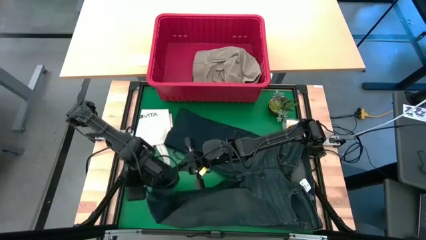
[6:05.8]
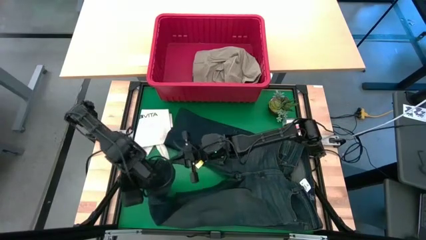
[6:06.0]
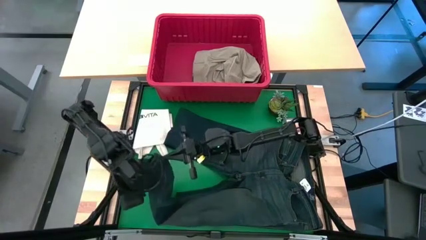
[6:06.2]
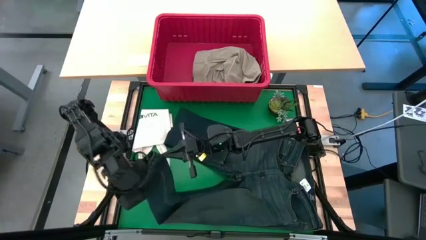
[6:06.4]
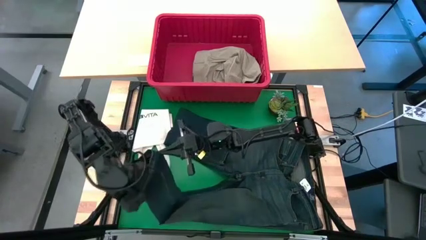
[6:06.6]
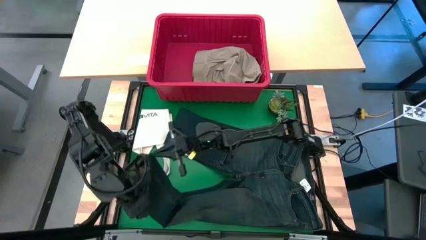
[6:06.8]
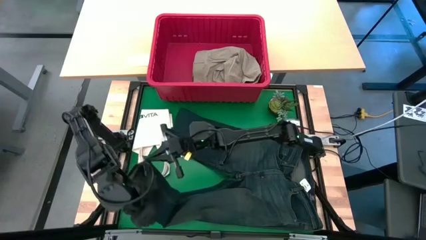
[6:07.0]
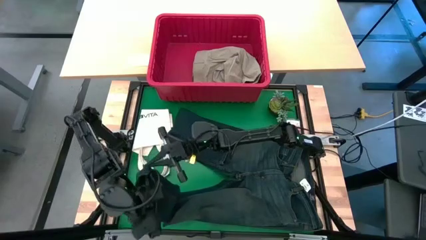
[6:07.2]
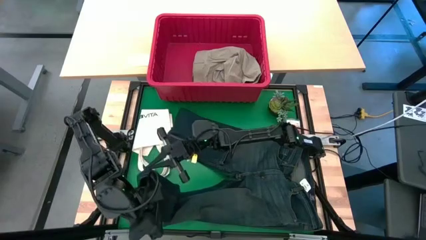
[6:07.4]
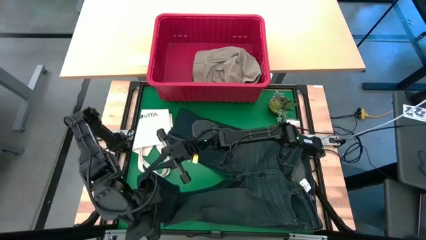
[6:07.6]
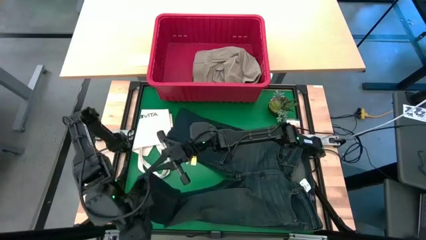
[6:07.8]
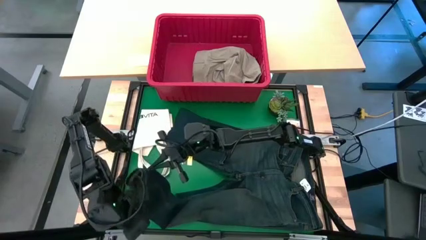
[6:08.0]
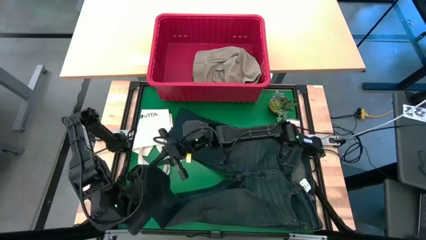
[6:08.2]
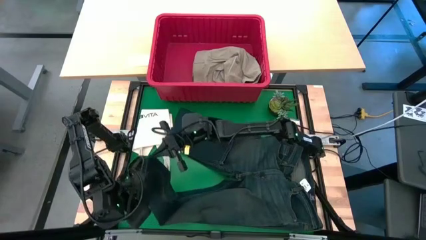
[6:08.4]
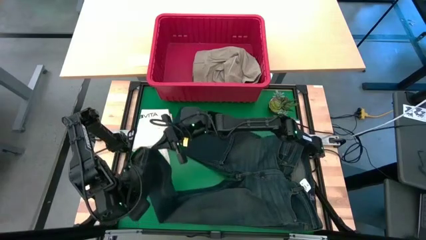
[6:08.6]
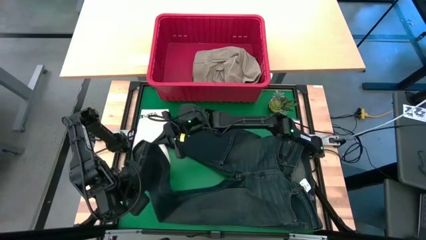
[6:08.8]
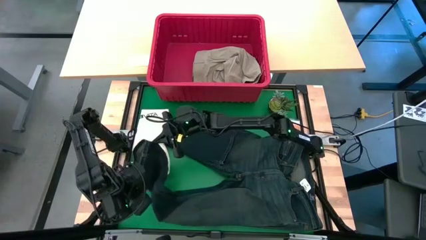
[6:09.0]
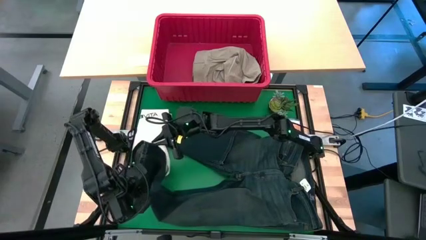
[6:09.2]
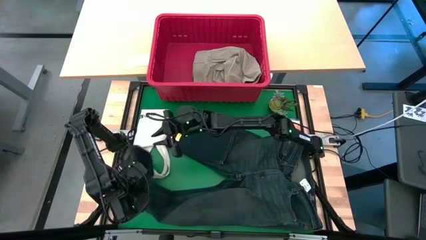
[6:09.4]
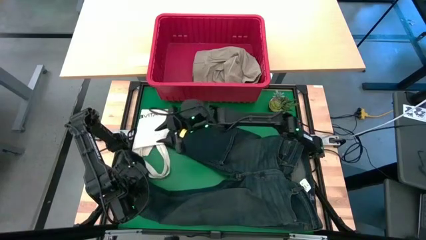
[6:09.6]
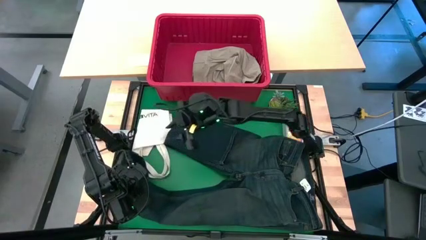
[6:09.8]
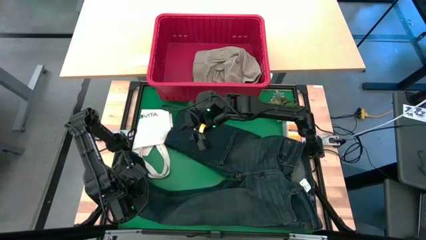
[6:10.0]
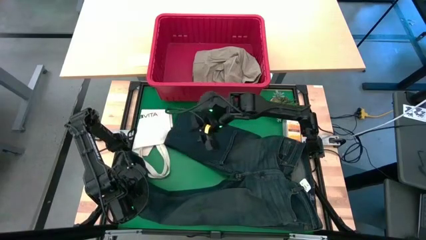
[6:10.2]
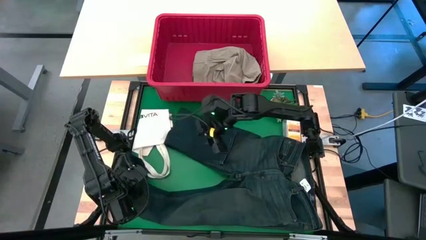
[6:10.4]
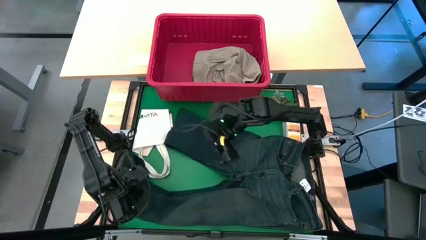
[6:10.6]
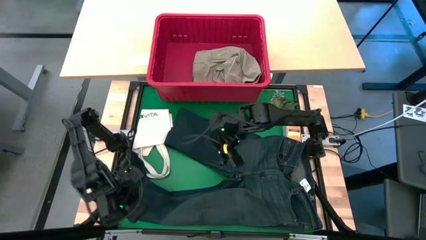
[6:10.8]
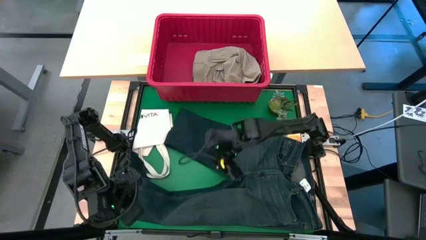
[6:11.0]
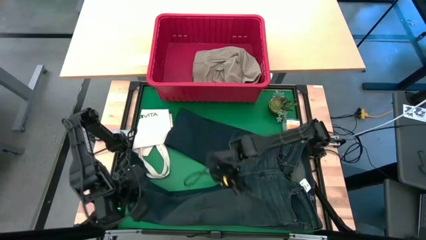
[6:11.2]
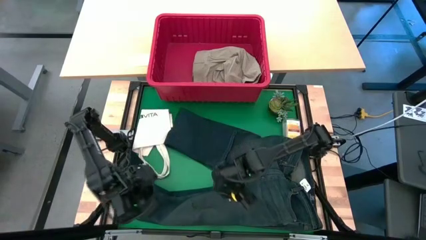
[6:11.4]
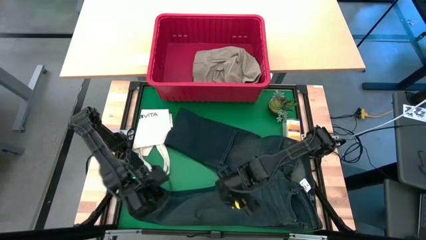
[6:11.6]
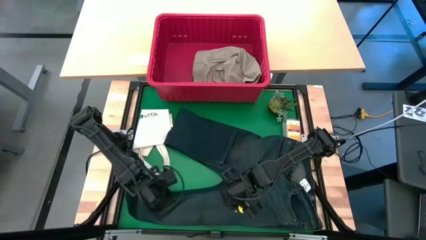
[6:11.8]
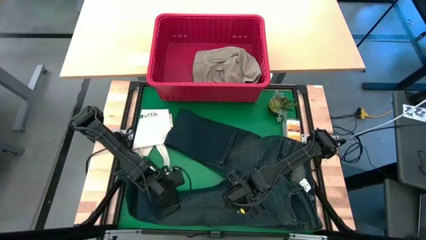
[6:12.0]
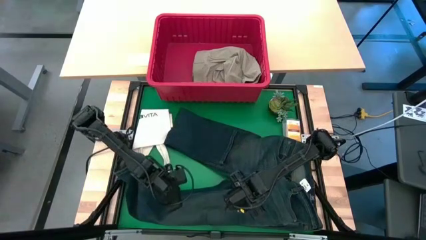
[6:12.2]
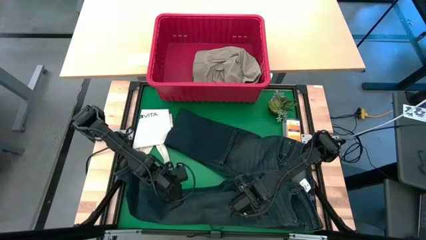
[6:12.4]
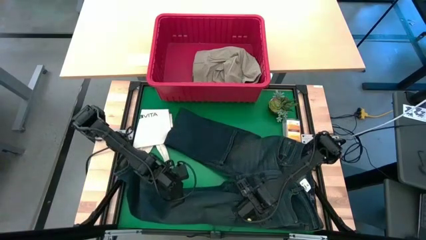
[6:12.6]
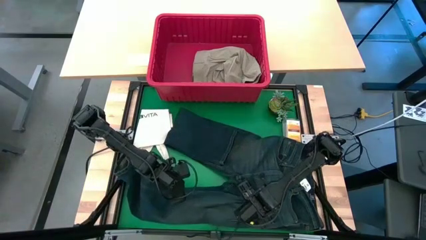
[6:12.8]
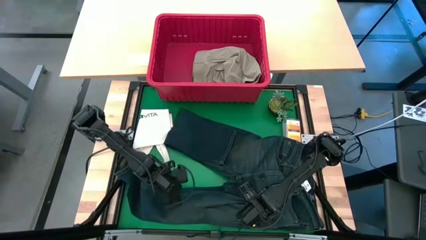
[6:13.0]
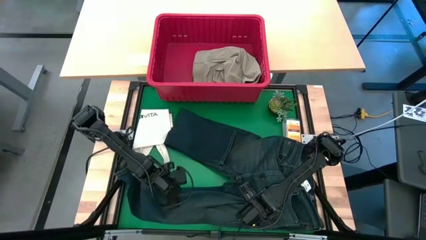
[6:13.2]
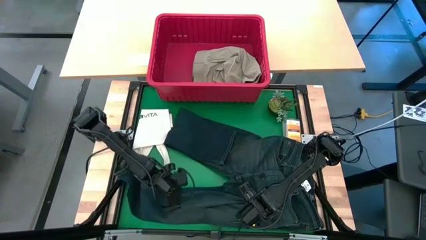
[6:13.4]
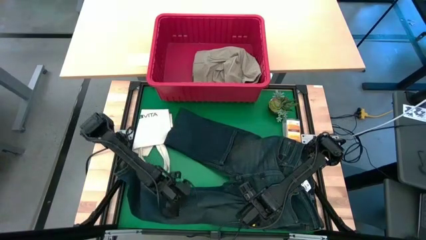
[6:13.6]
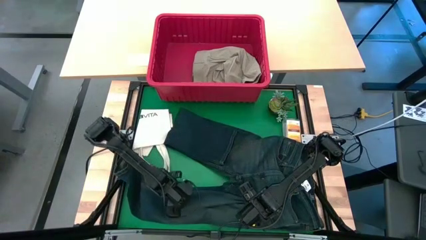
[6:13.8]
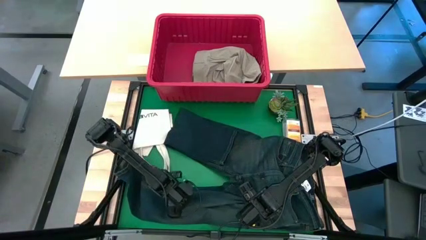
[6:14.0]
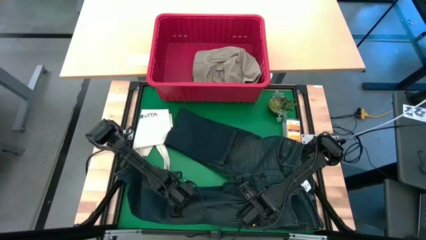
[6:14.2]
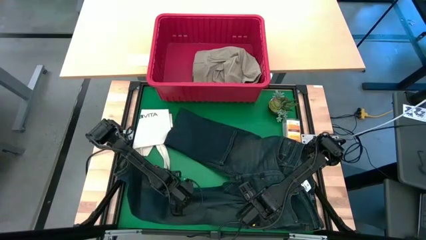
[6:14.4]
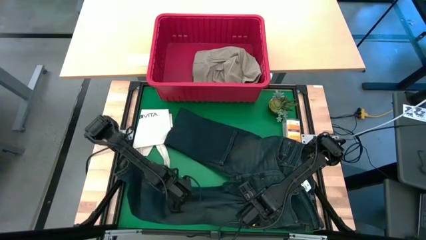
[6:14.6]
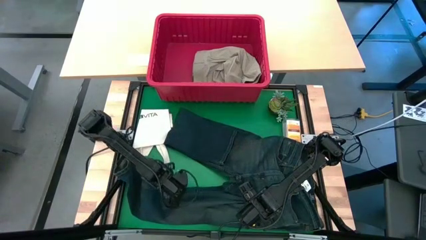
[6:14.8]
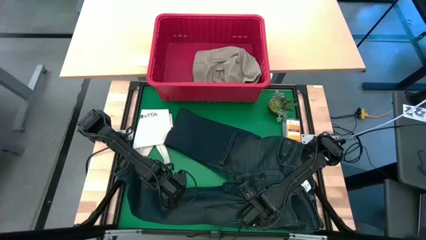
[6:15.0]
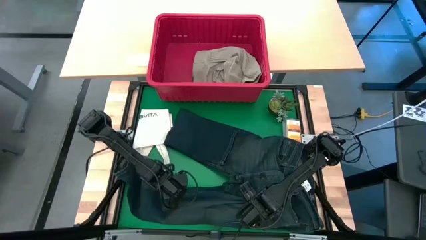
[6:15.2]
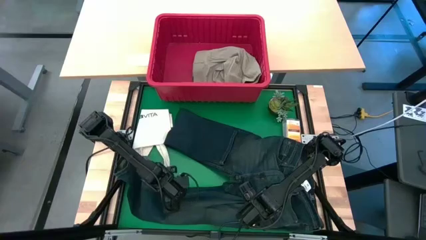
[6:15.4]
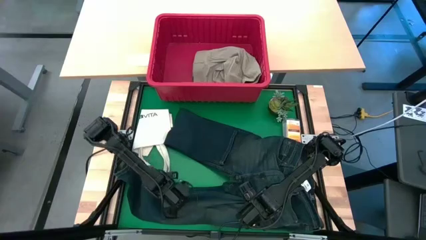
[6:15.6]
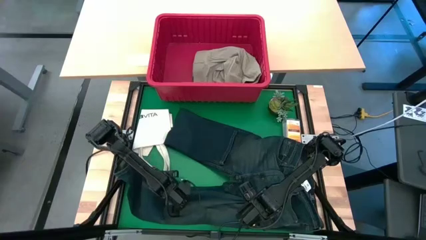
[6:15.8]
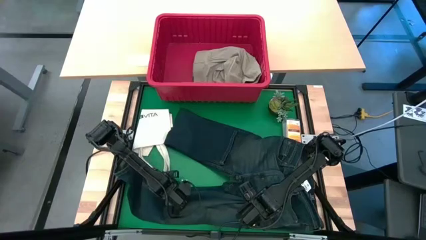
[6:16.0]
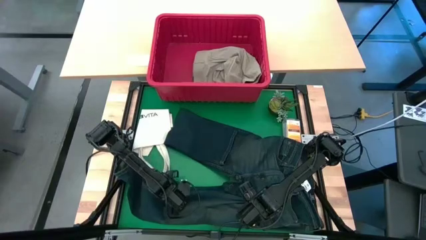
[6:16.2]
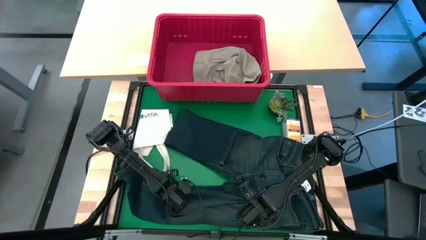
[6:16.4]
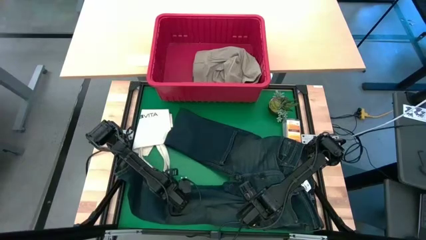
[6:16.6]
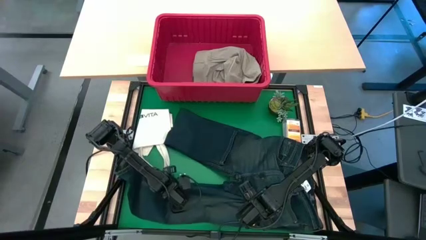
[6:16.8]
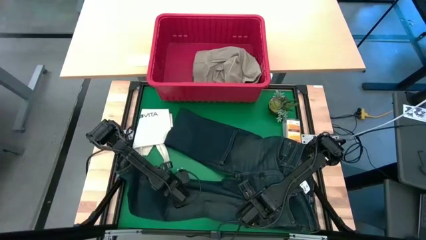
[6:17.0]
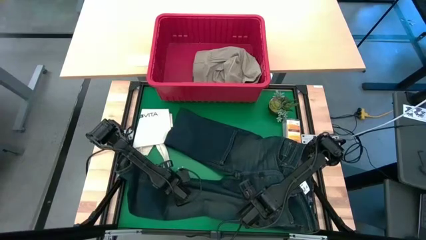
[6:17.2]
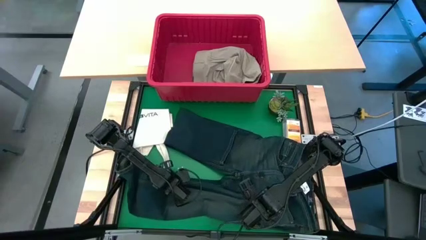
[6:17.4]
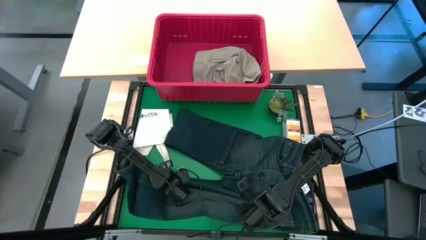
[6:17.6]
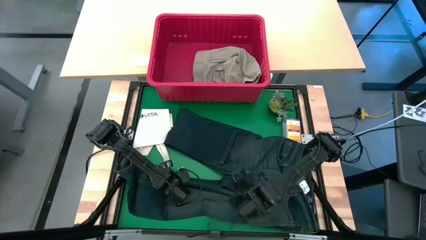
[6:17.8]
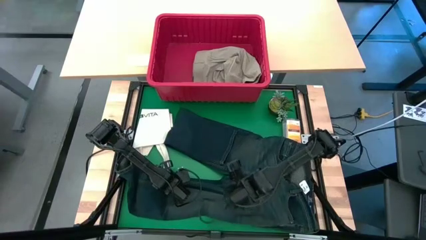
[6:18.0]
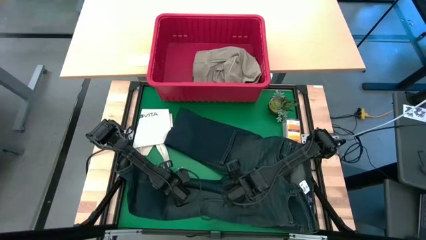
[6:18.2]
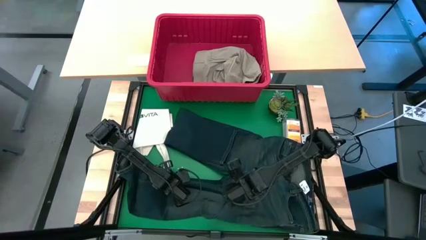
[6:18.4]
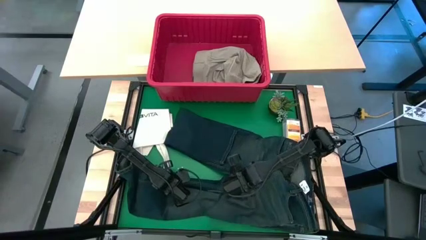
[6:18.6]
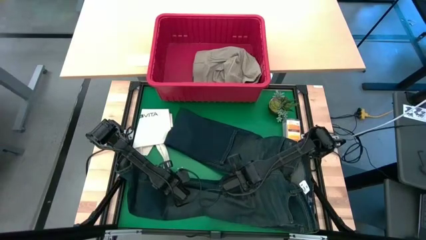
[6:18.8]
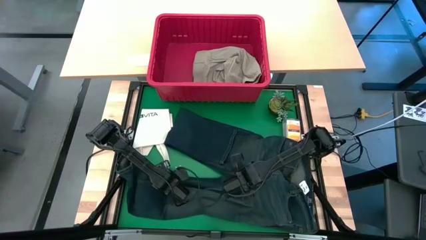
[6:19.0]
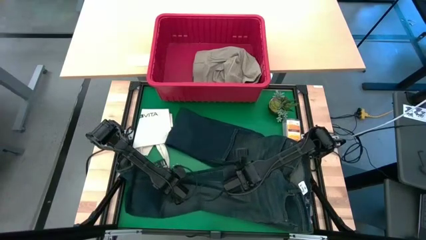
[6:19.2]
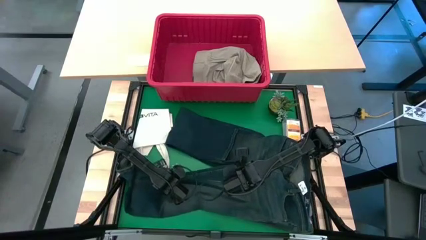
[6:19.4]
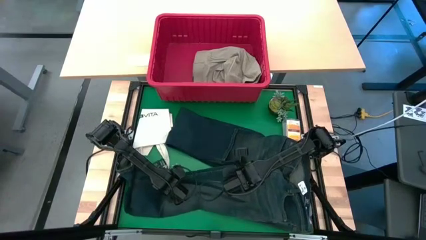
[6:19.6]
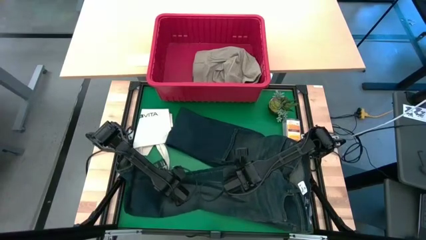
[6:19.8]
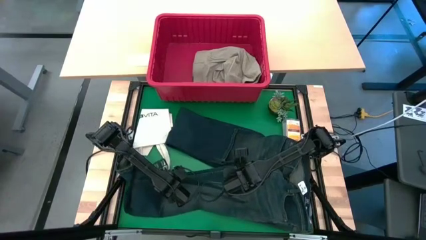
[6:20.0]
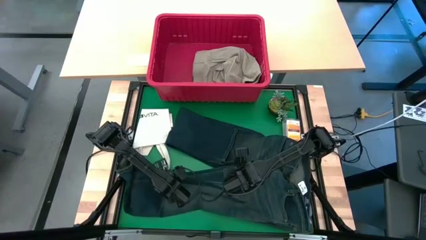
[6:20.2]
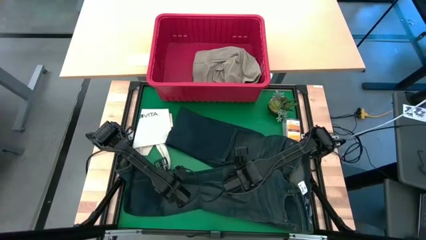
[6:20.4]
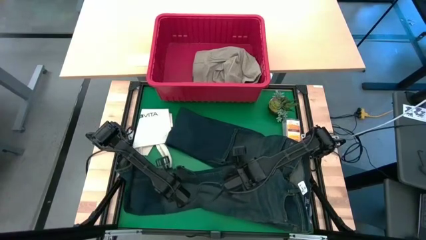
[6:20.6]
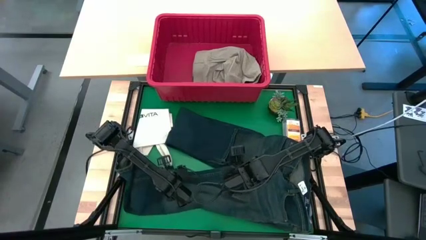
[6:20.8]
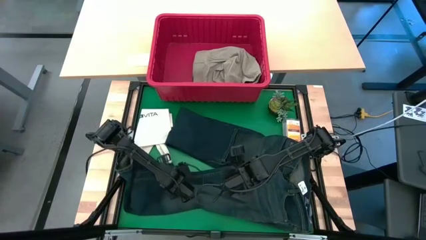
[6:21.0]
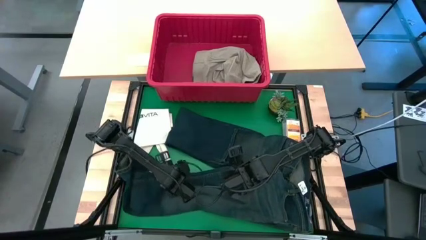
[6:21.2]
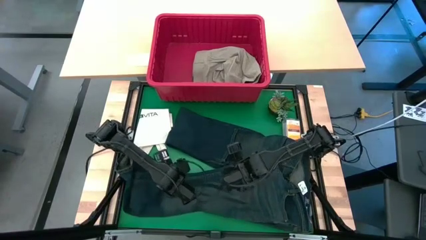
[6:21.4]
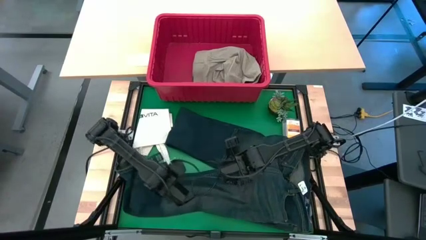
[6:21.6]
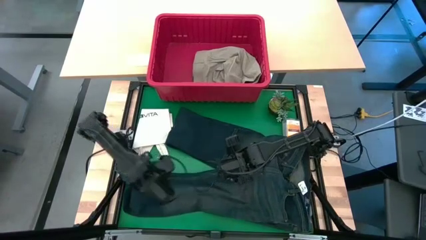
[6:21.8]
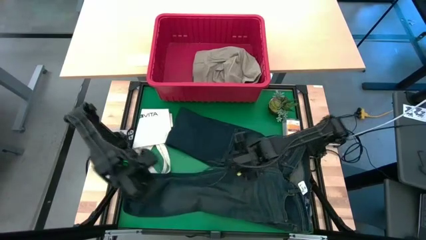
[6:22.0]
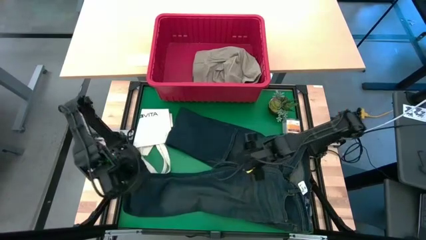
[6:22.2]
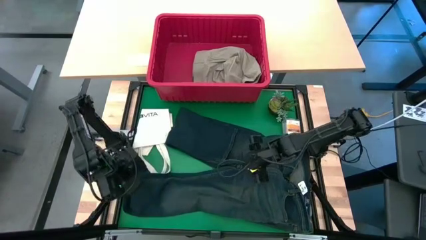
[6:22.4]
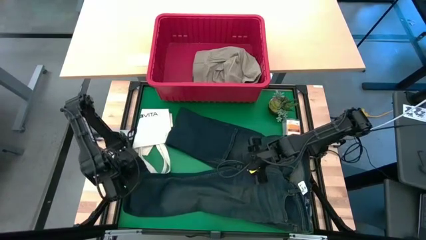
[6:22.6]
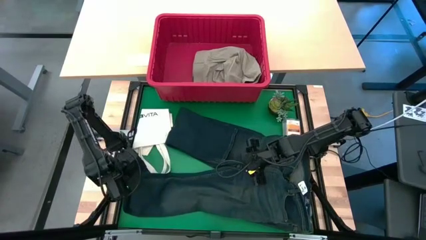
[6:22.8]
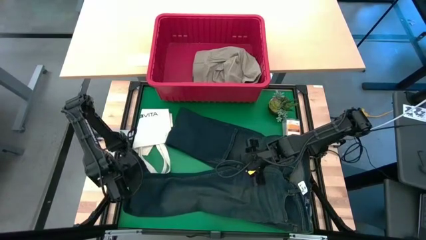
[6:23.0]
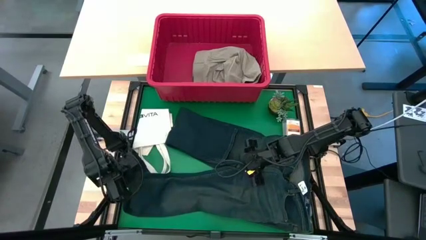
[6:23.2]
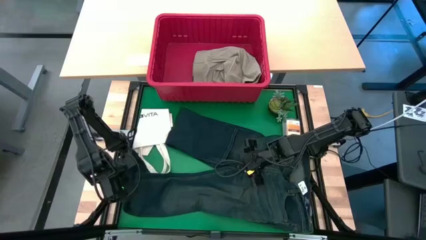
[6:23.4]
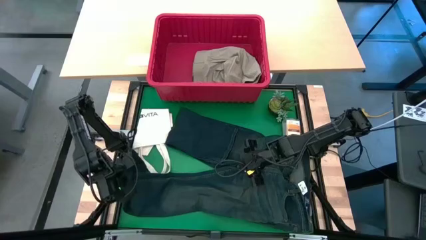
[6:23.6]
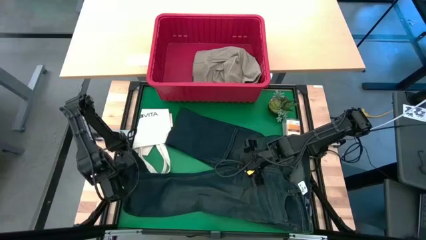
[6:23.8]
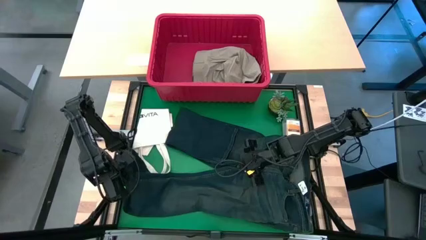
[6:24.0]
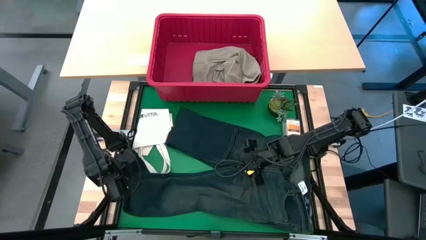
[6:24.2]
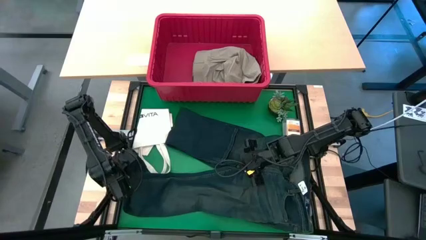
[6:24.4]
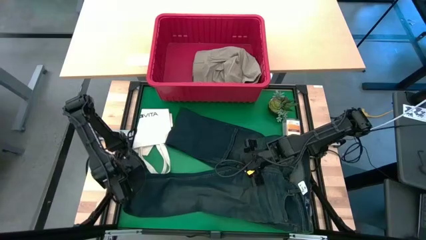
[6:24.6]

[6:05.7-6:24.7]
Task: Fold Laundry from Bin
Fold the dark blue jeans
